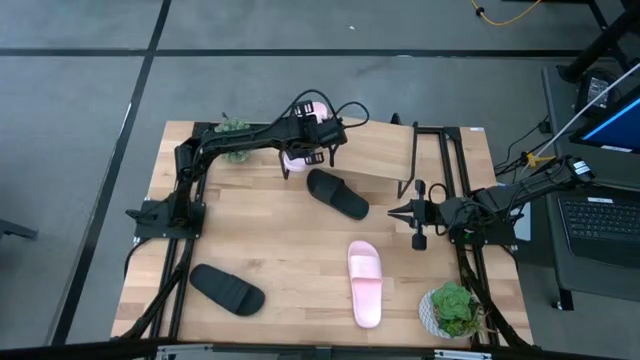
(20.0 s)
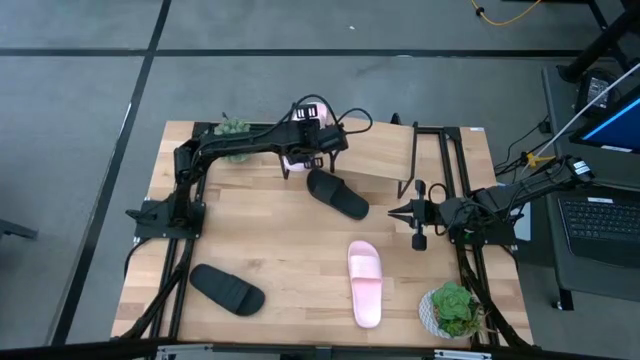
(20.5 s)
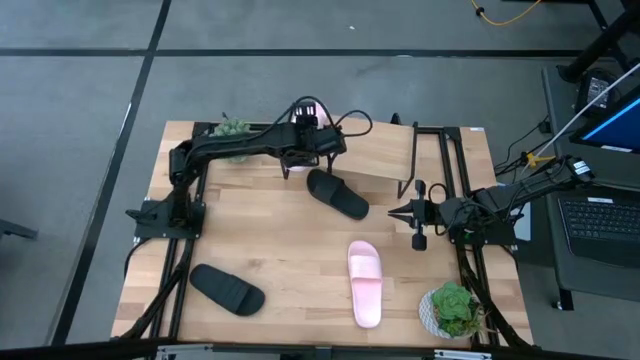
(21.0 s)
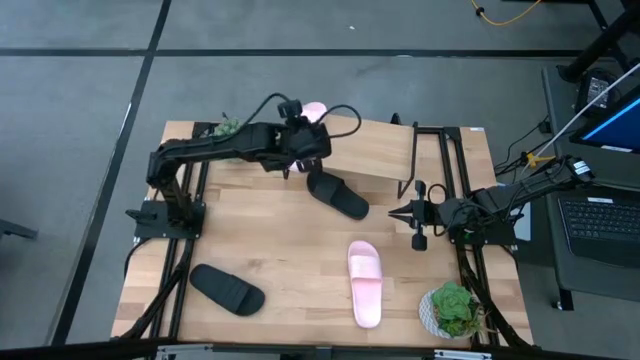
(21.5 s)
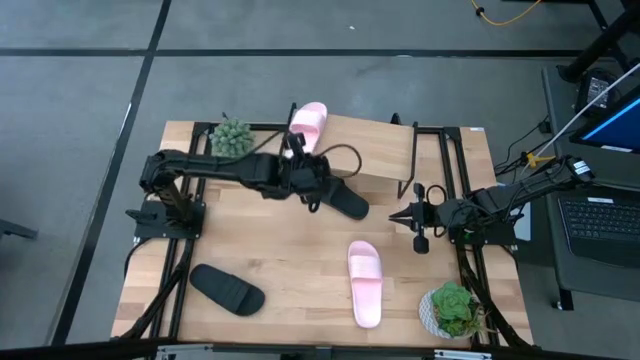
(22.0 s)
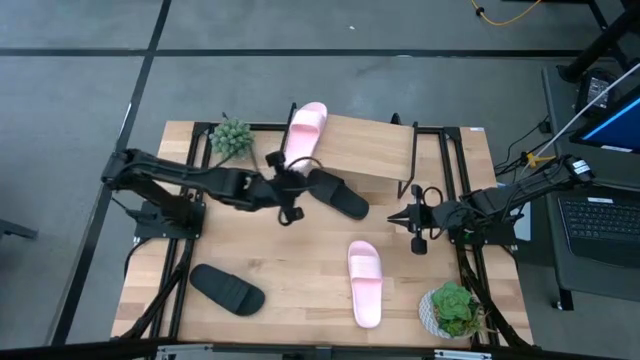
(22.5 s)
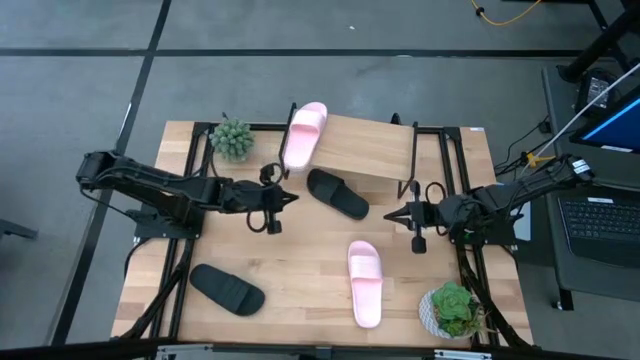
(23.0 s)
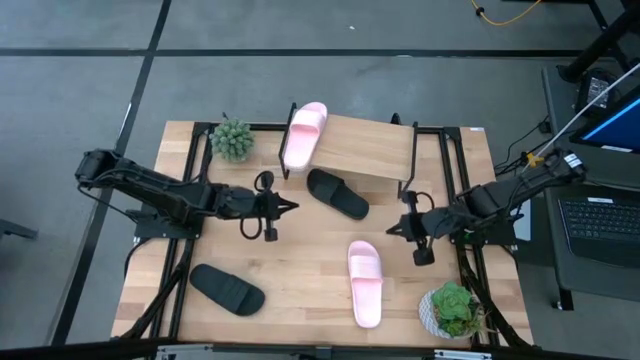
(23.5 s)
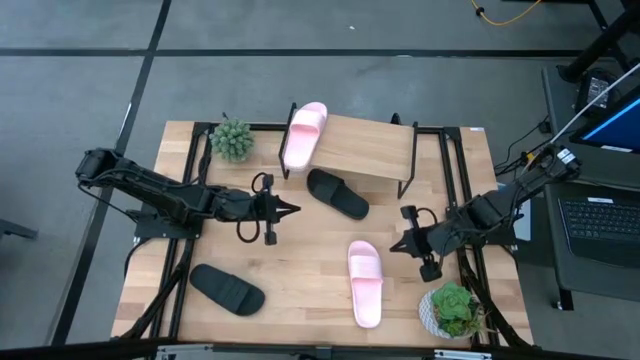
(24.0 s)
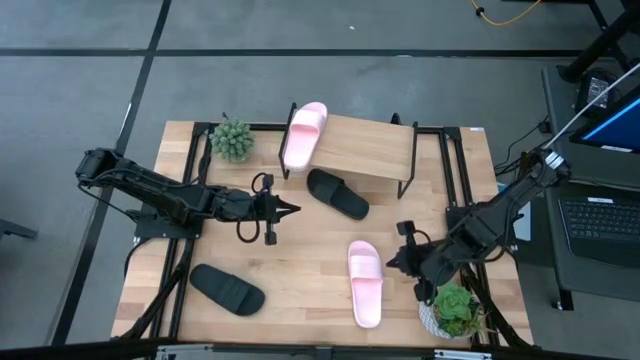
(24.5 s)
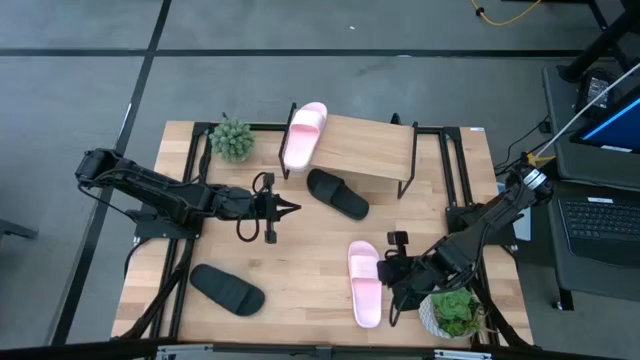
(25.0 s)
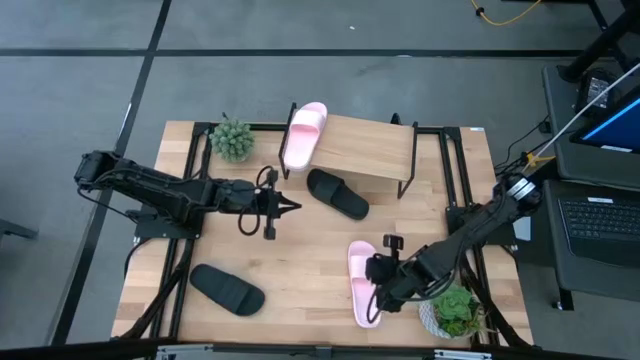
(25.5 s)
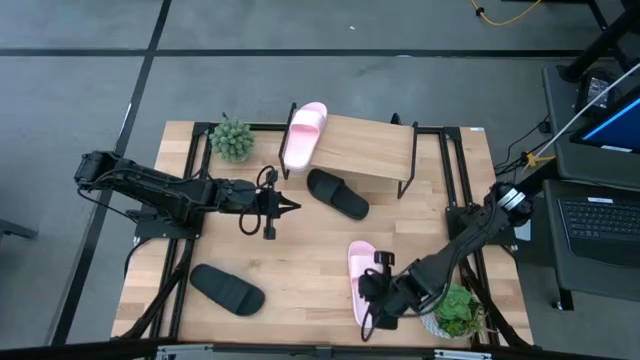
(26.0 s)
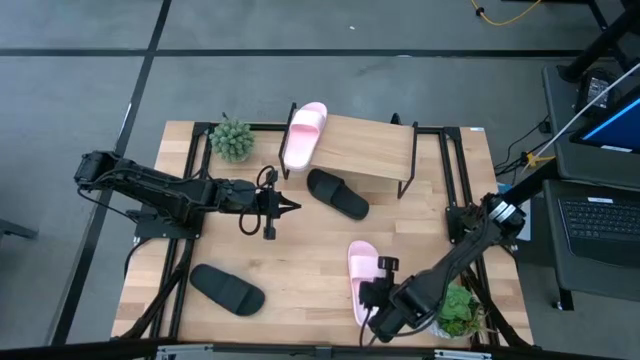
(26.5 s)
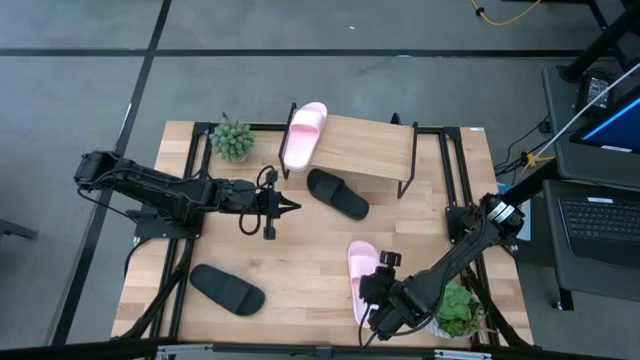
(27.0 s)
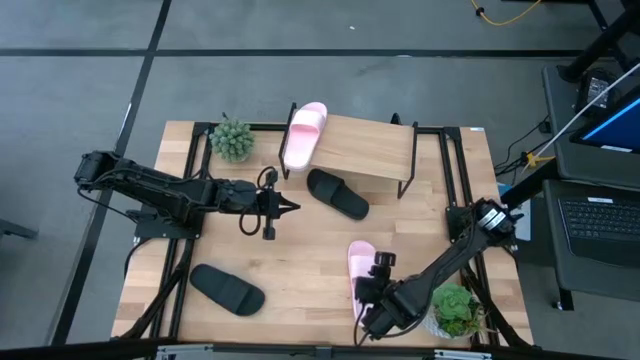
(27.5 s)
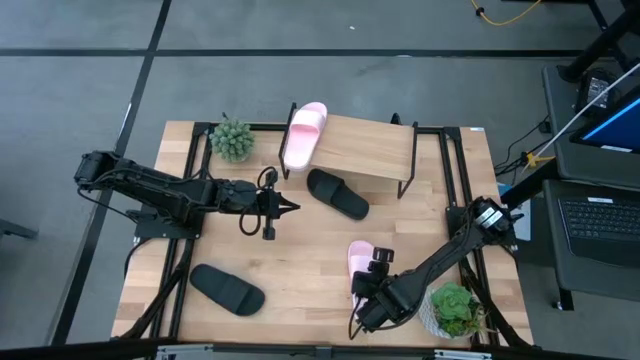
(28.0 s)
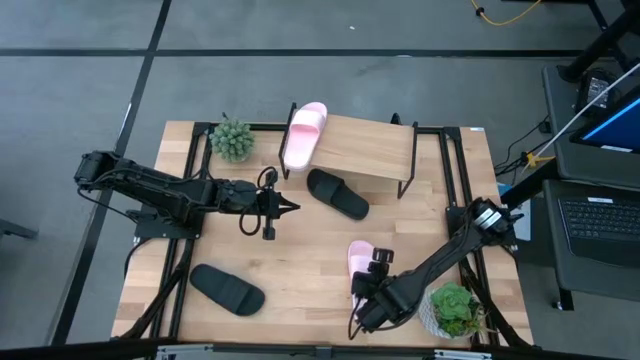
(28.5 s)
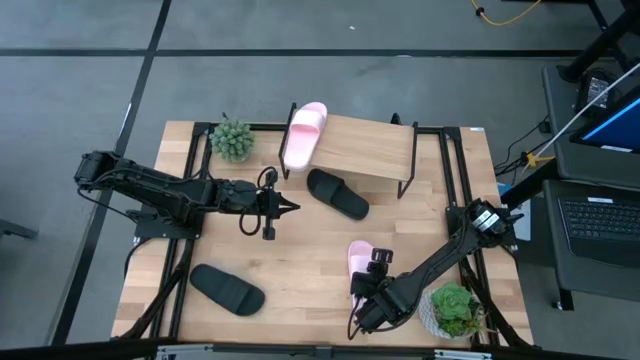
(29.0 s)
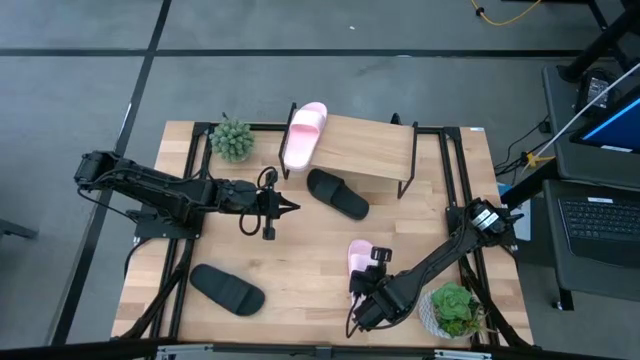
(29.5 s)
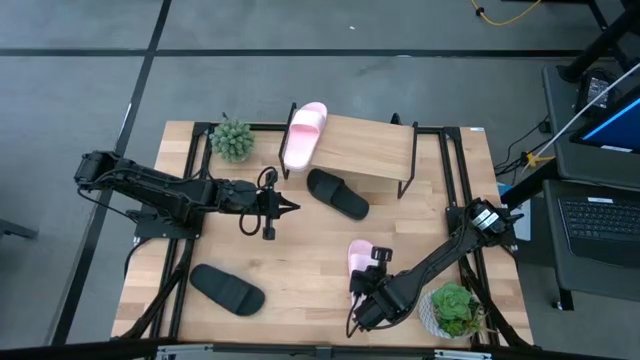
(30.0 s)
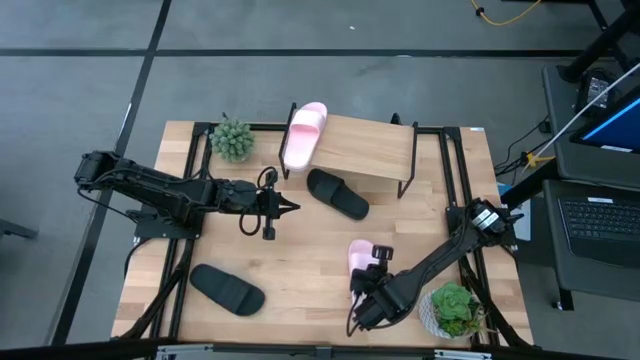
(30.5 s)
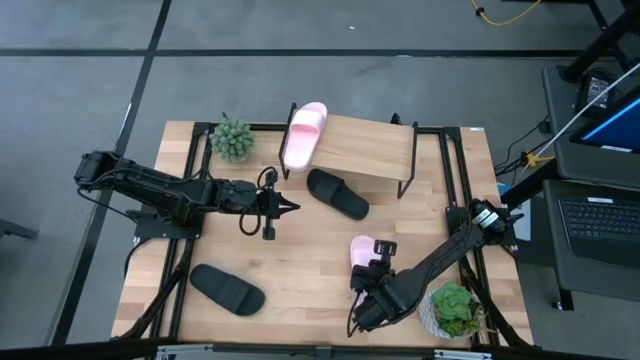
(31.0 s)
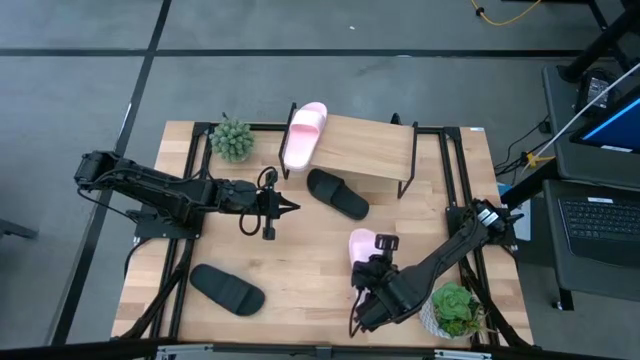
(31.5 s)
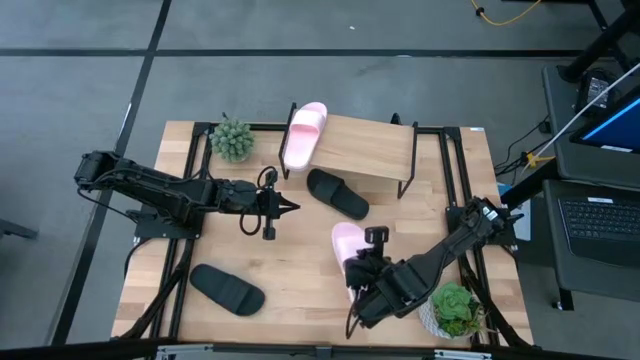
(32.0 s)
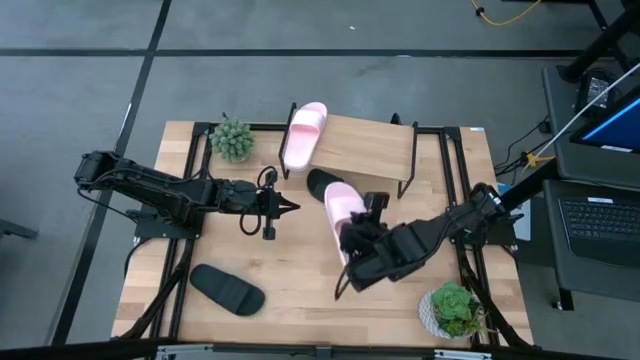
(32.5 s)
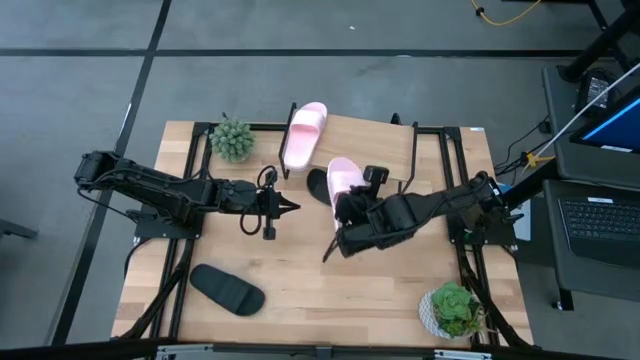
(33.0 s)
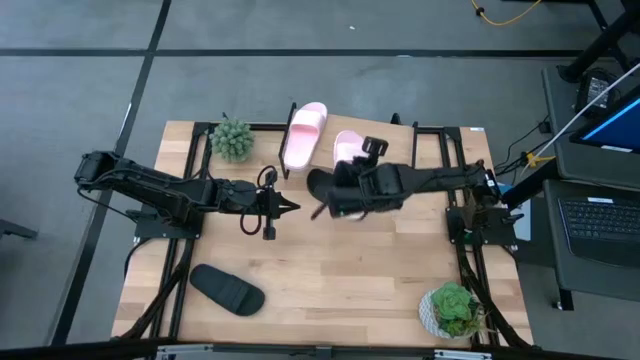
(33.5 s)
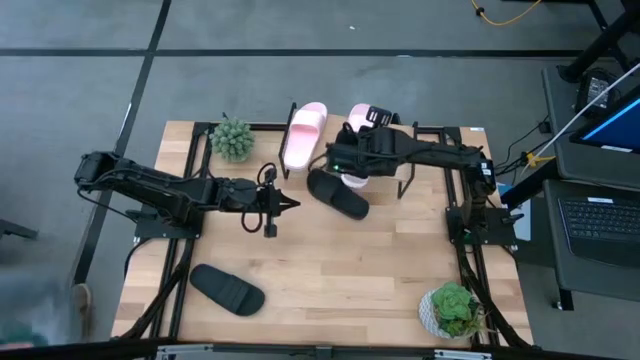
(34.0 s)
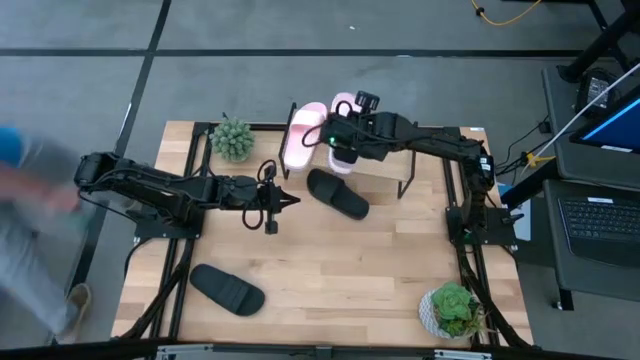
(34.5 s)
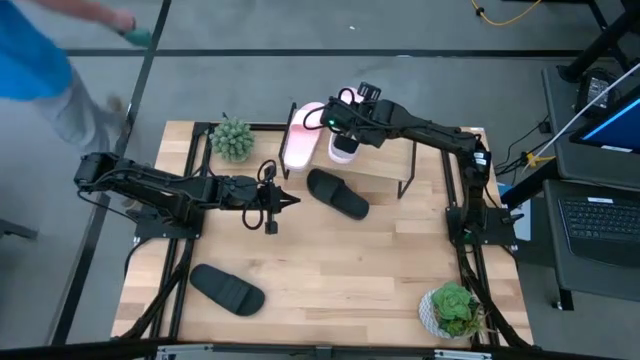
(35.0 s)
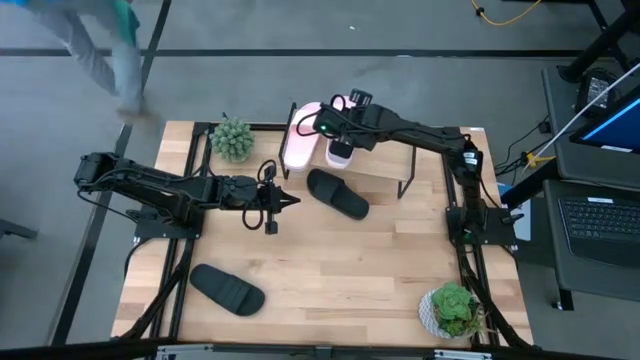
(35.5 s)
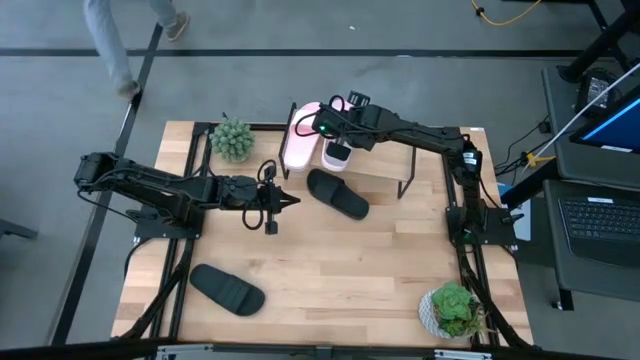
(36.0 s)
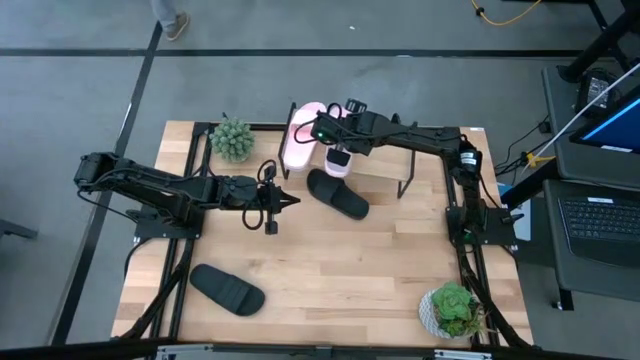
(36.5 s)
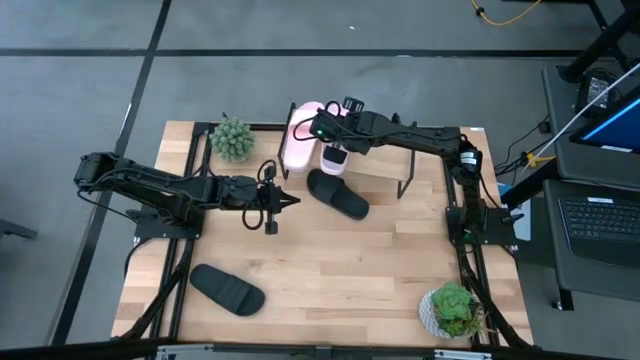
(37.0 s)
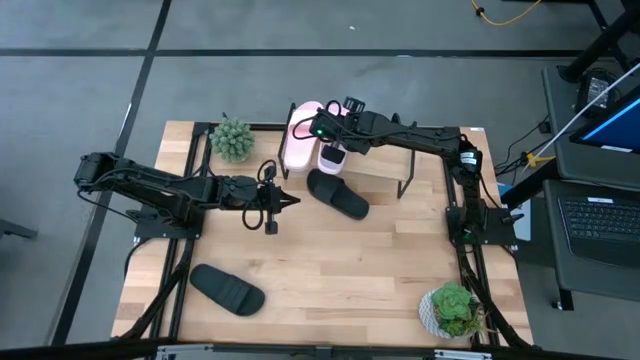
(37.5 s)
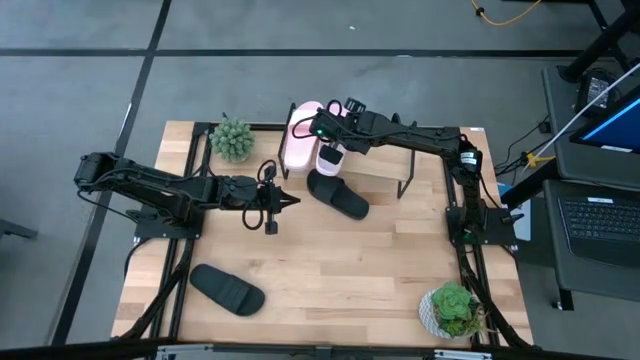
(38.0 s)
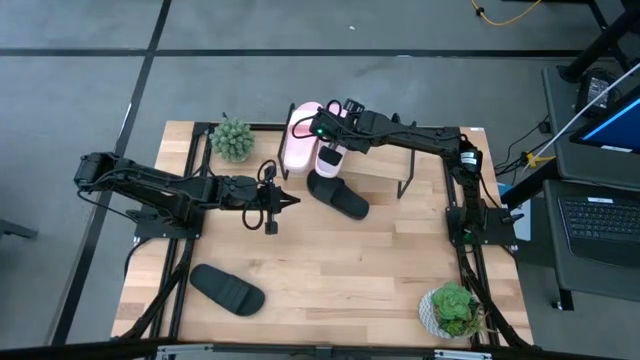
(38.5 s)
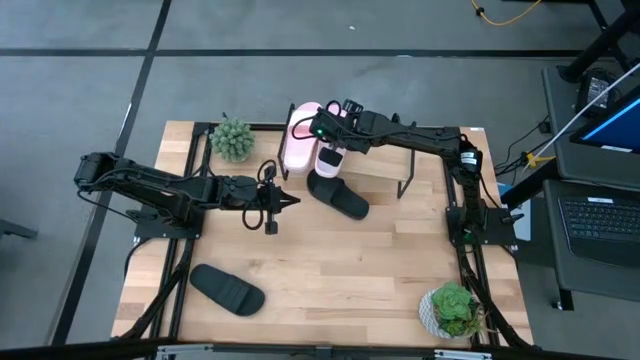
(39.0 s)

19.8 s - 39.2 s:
Task: Pick and place slides into the shelf
Put the pink slipper on the shelf
